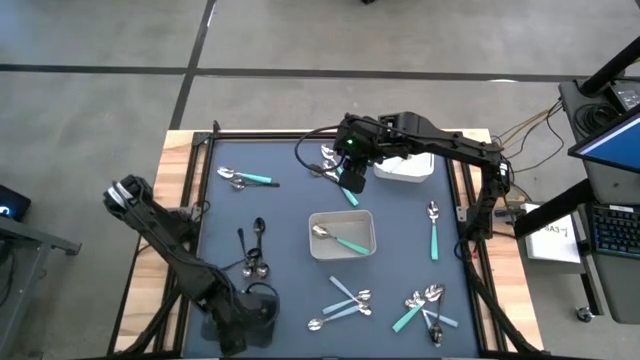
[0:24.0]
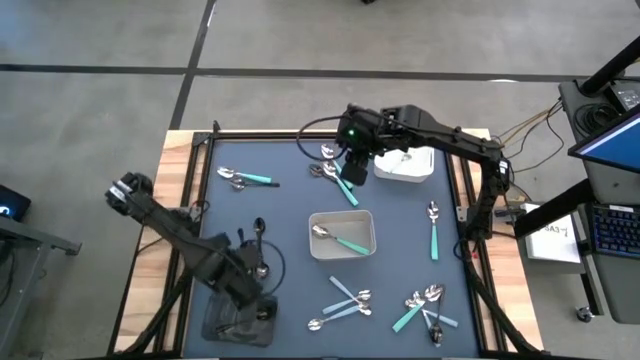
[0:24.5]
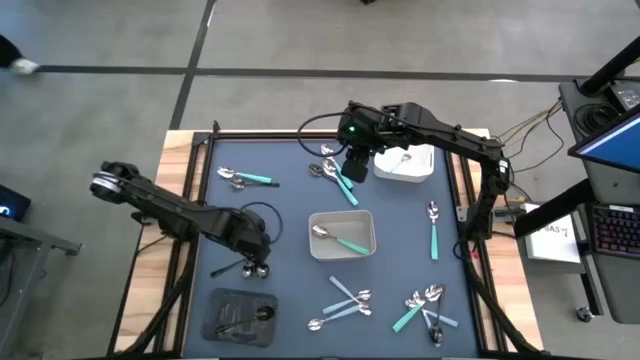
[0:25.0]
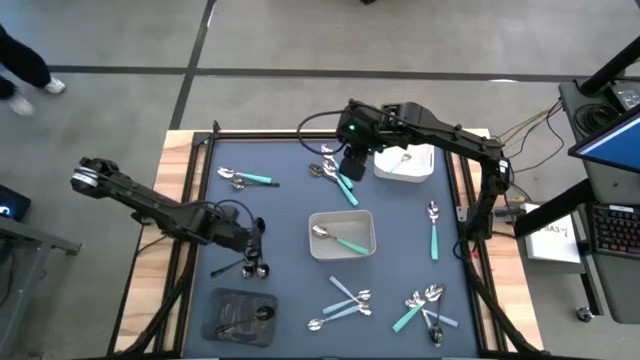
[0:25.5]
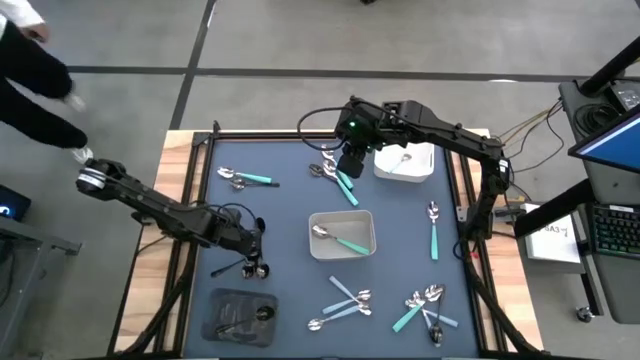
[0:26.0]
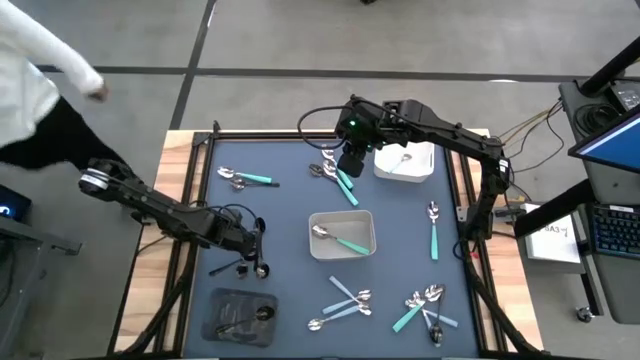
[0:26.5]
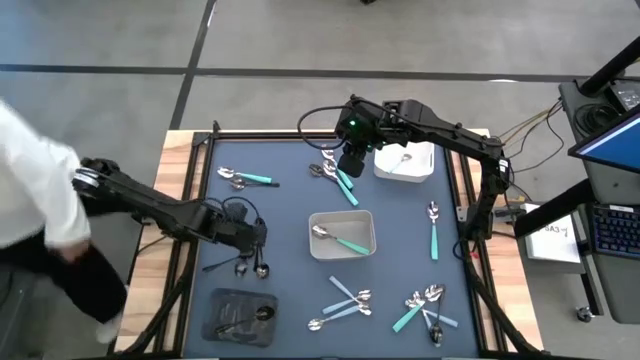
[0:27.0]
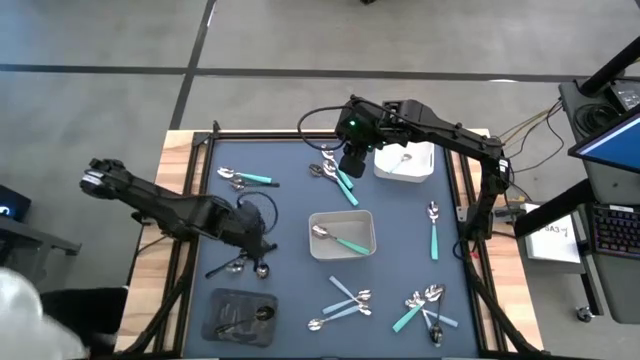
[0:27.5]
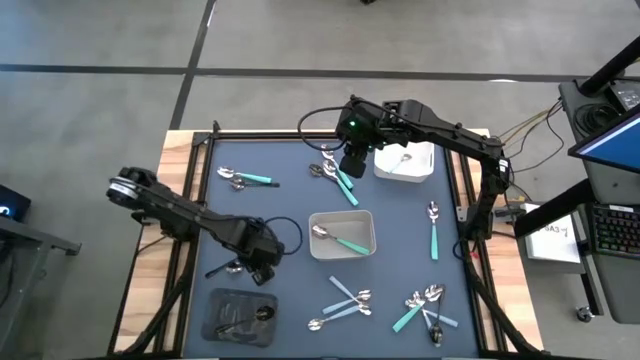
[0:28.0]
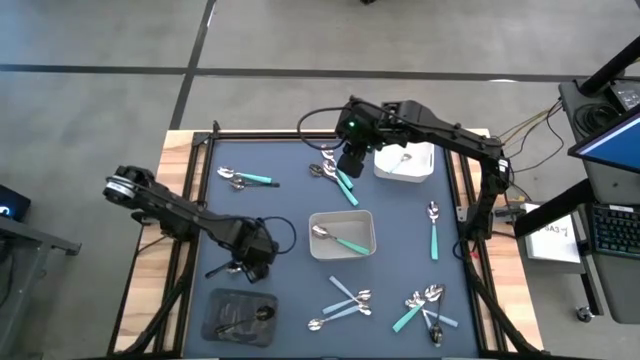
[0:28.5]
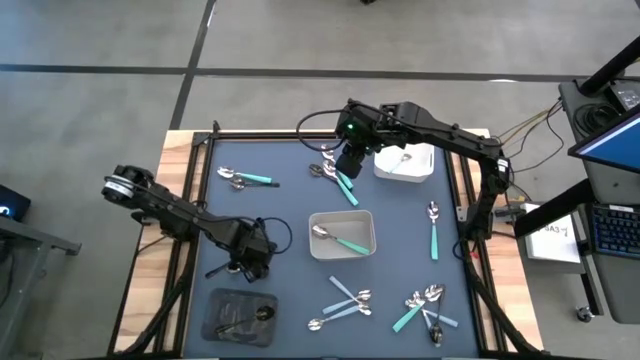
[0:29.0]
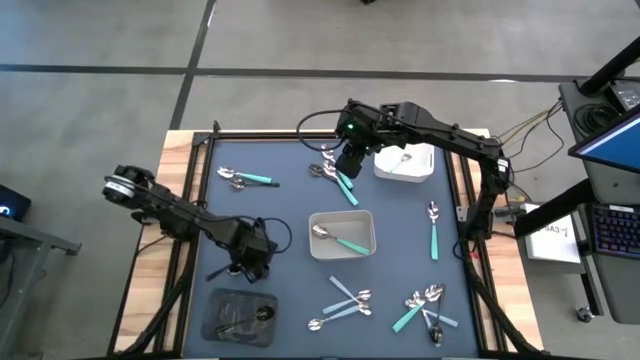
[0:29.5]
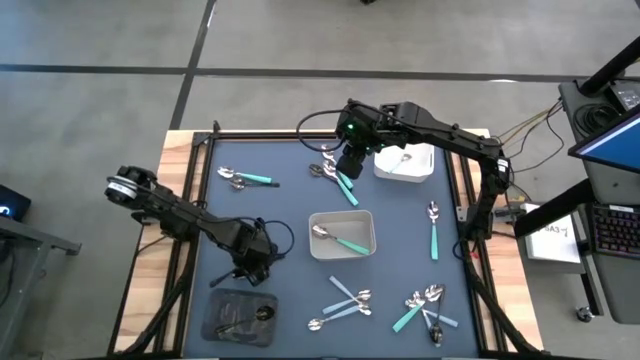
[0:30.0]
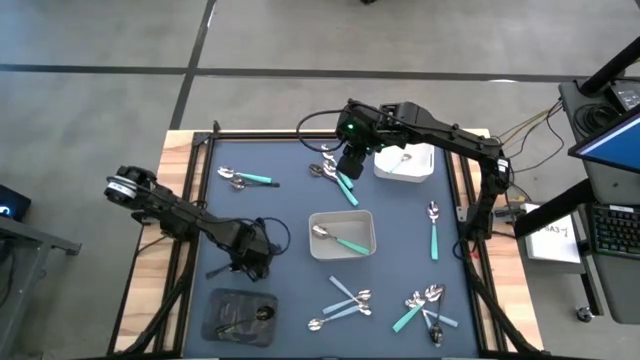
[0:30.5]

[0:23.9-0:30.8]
Task: Sort silverware by color (type)
Put the black spoon into the black bin

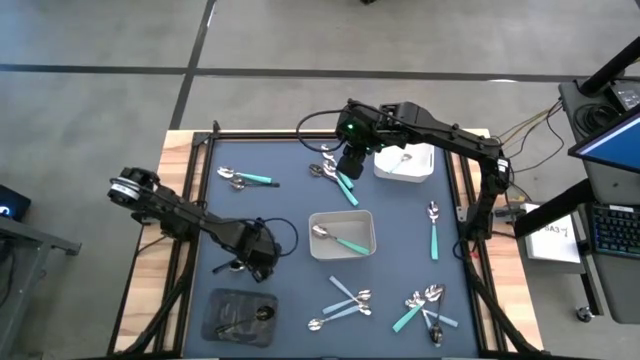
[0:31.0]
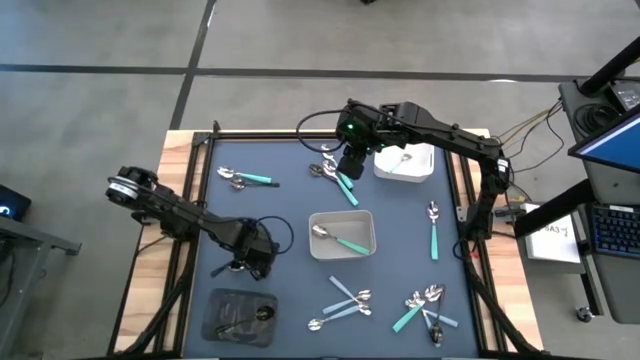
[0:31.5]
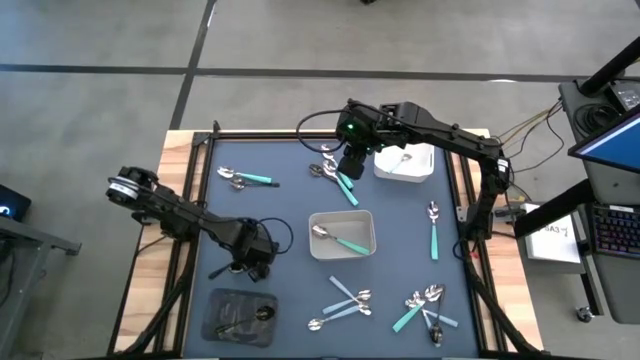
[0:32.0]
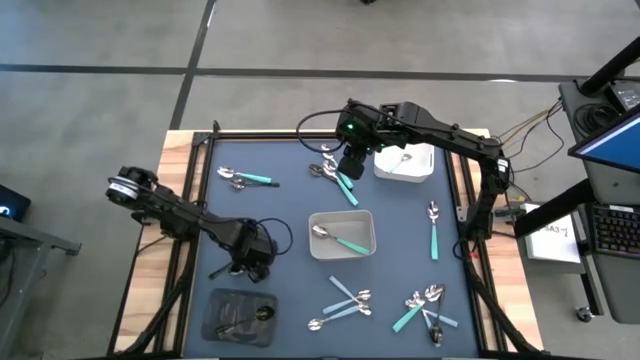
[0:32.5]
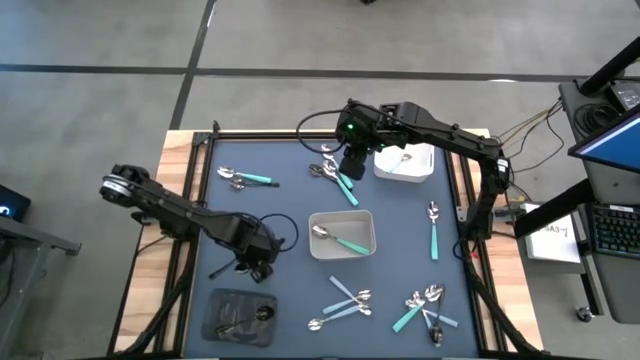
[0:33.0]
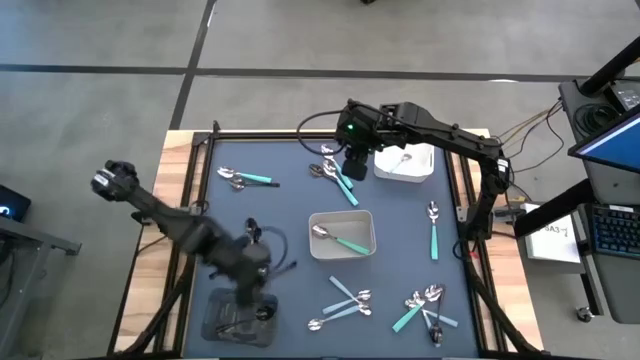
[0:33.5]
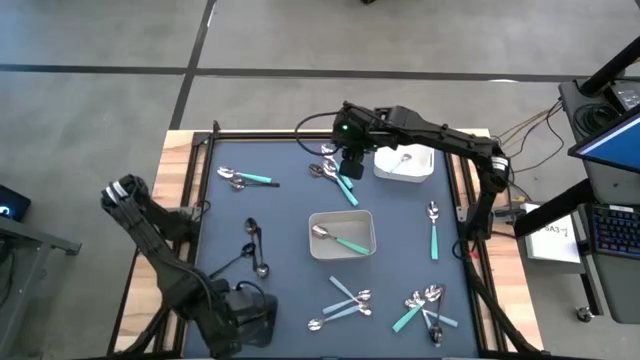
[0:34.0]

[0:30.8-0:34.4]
Put the black spoon into the black bin

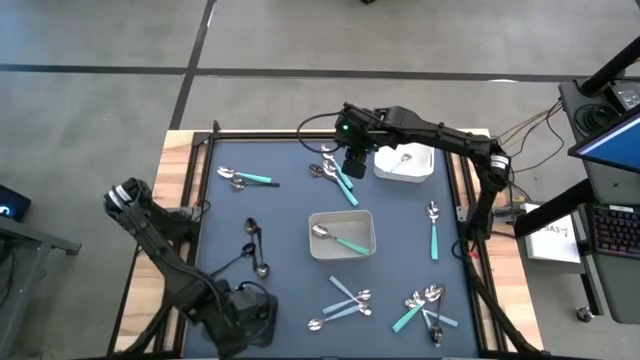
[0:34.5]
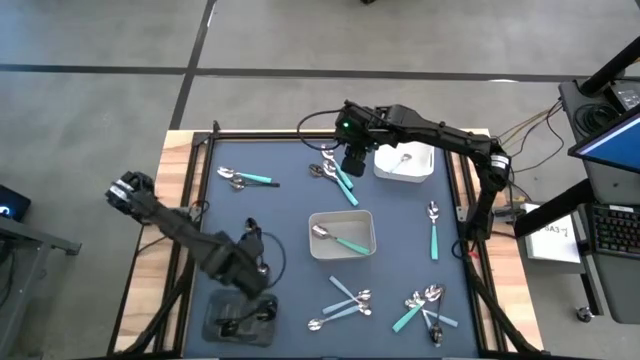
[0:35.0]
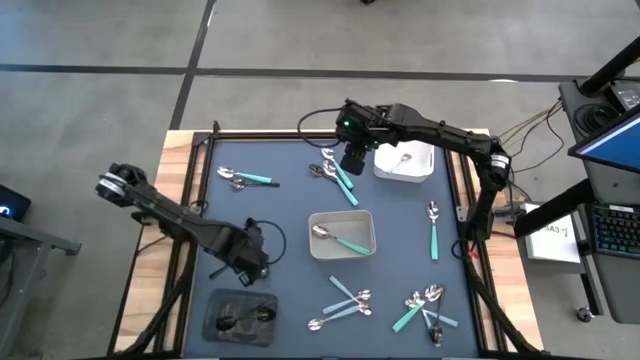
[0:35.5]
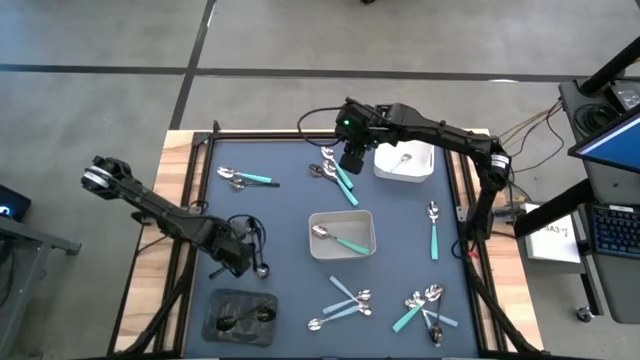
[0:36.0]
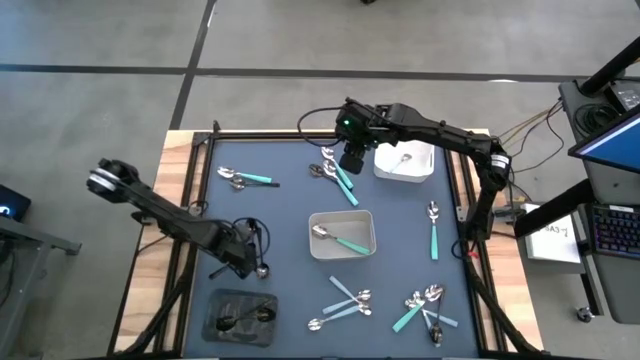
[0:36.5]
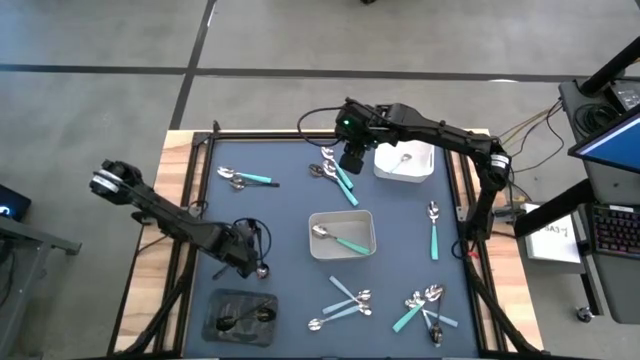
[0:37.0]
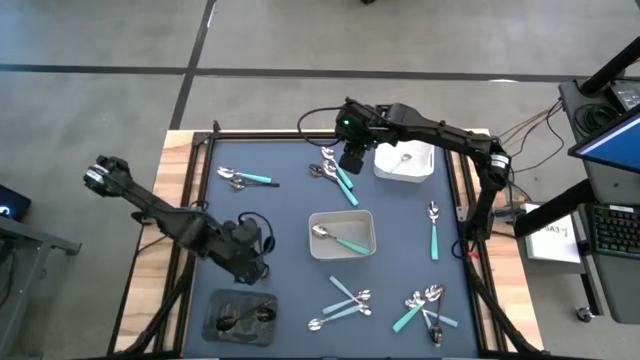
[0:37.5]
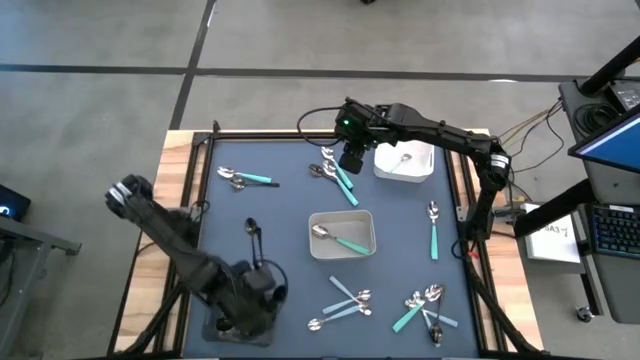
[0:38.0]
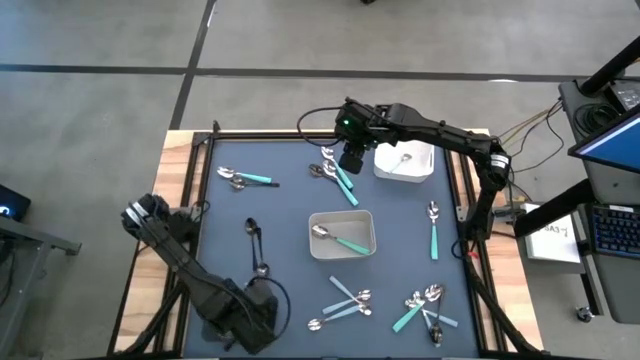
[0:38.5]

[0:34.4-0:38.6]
Put the black spoon into the black bin

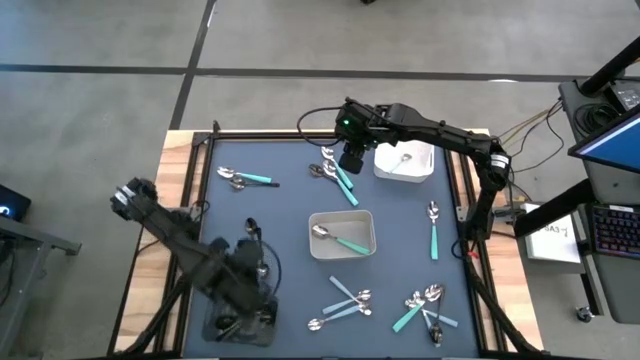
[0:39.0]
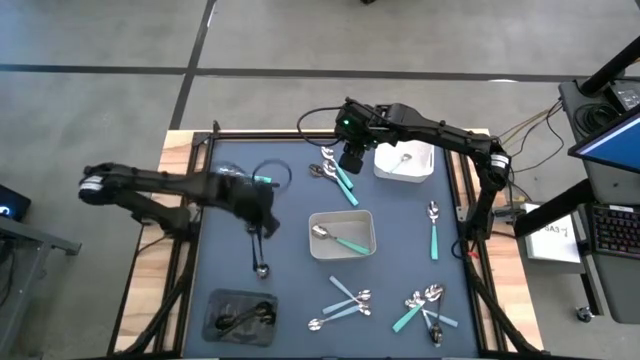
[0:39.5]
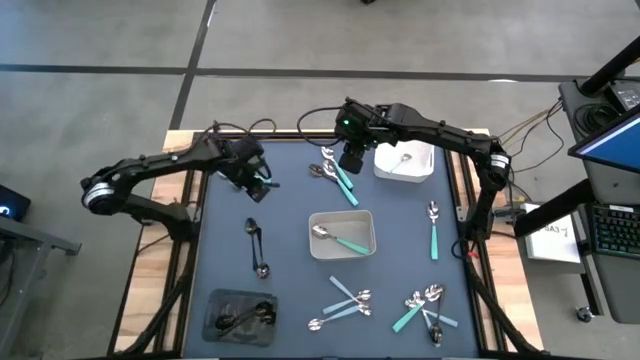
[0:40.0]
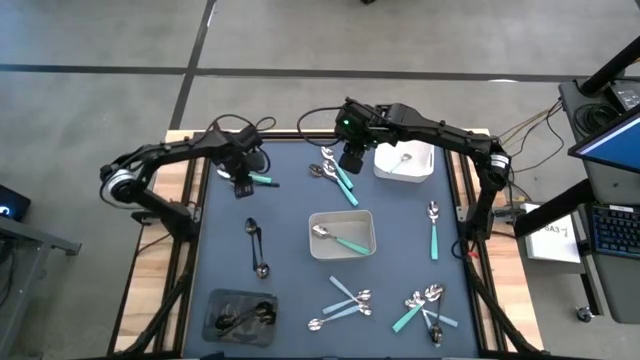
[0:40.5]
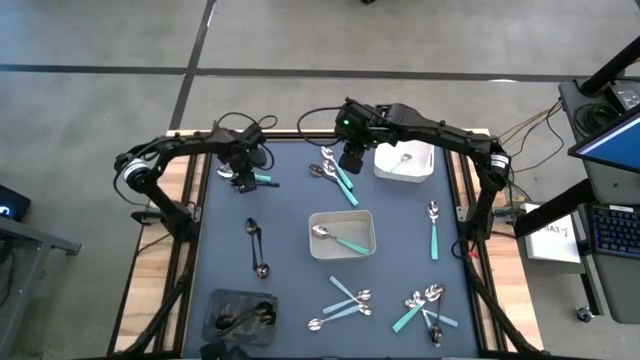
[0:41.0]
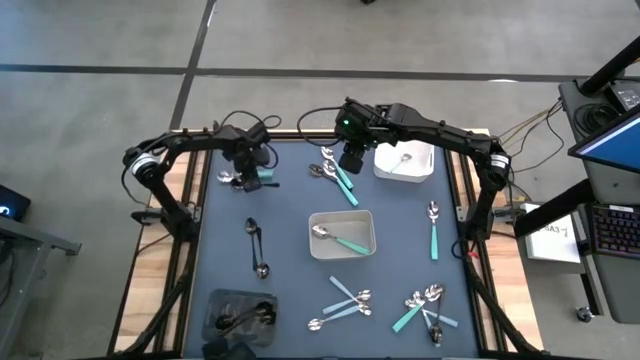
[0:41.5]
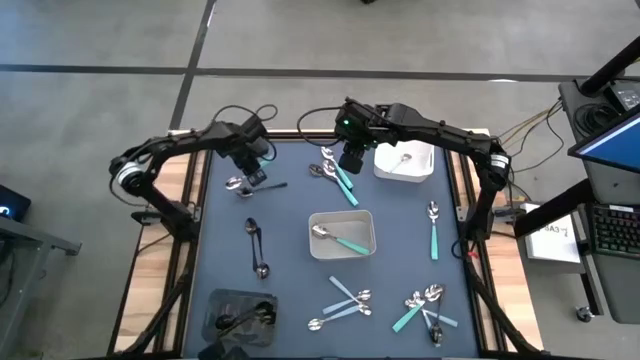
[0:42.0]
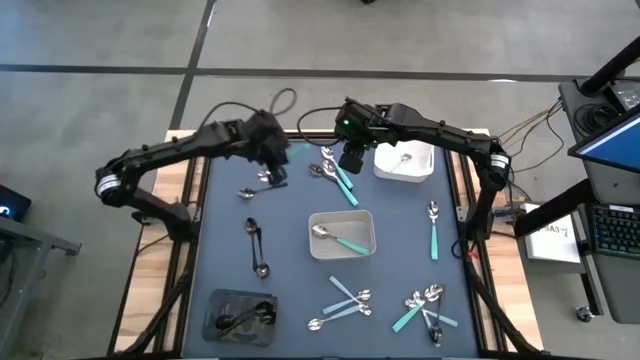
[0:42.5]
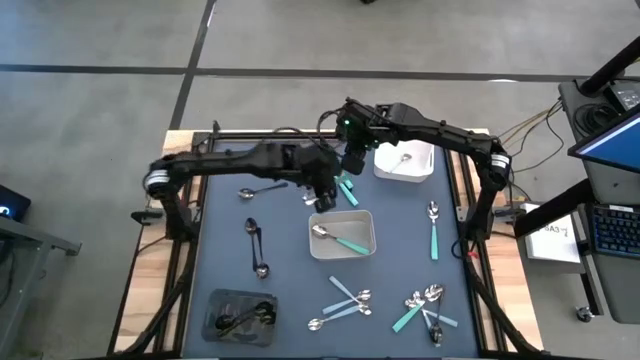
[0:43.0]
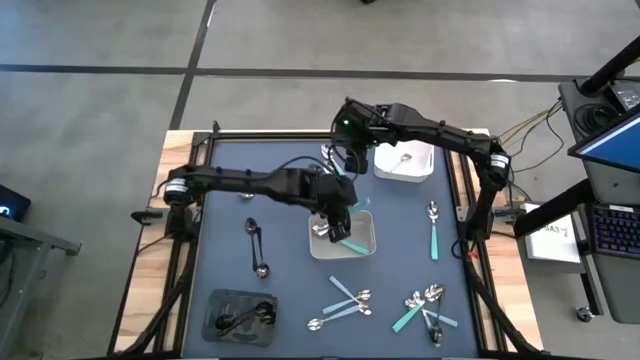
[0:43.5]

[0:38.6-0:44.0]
Put the green spoon into the gray bin

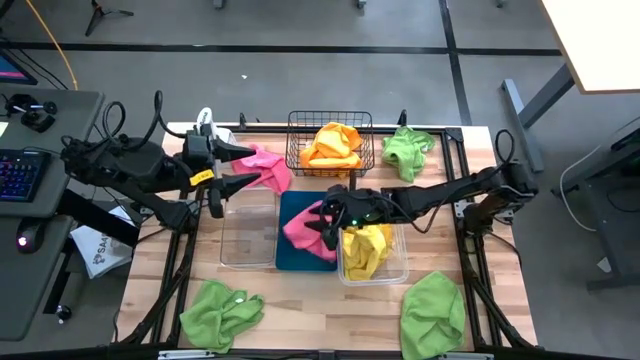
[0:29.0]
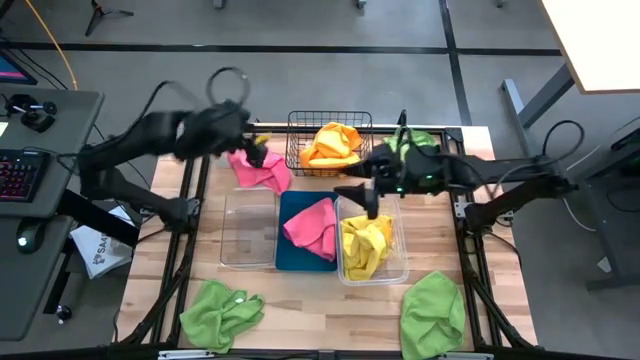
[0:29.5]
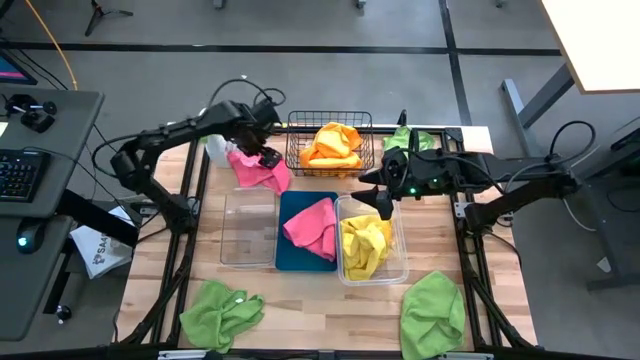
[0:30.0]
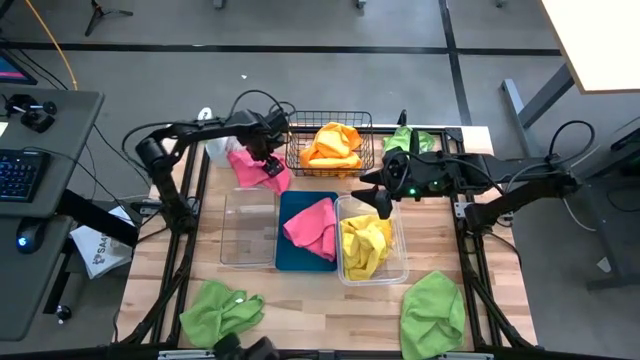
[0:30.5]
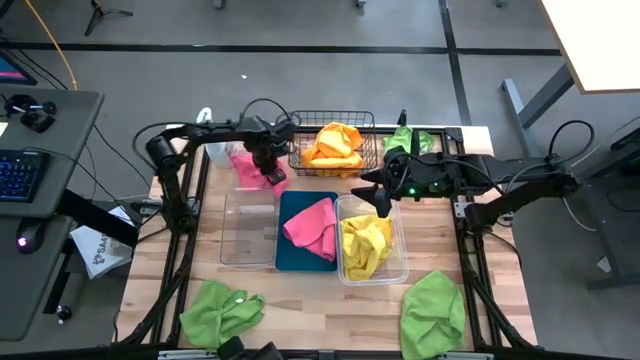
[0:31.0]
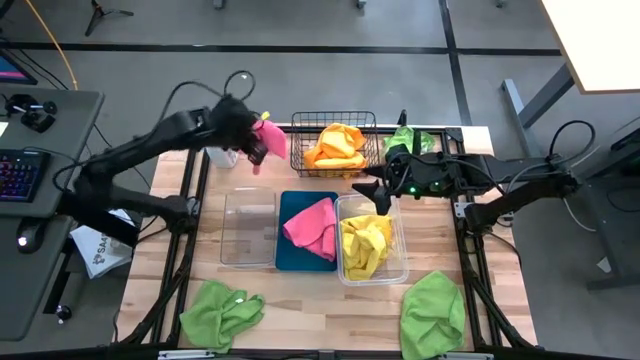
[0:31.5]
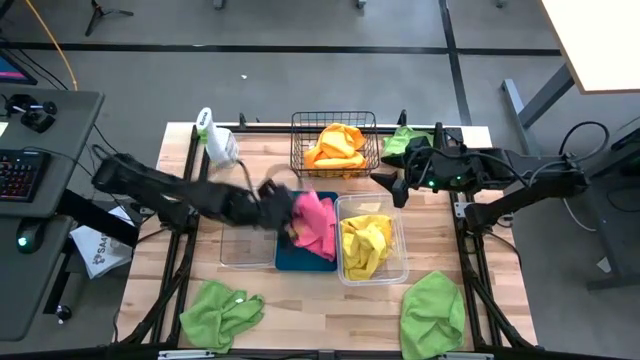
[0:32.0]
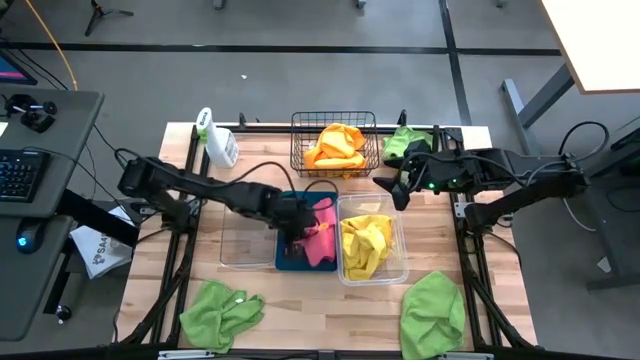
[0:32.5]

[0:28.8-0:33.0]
Task: Sort microfiber towel by color & place in baskets
Put the bottom pink microfiber cloth into the blue bin
